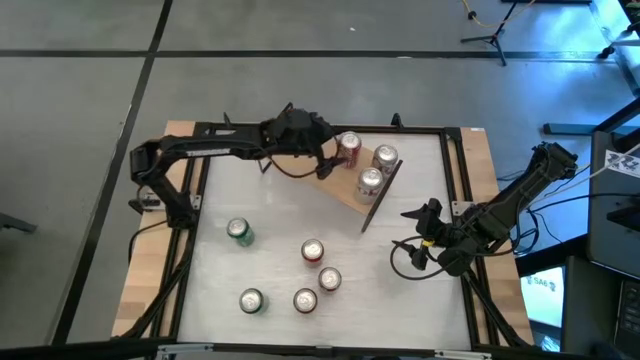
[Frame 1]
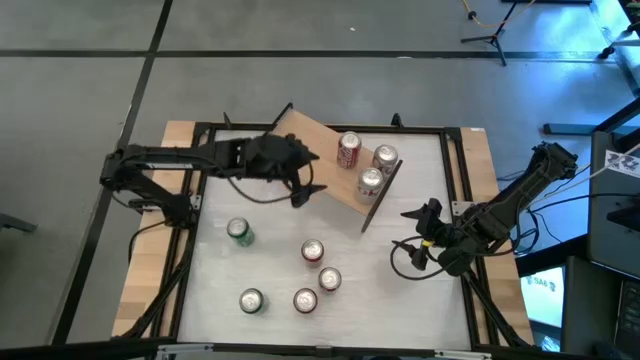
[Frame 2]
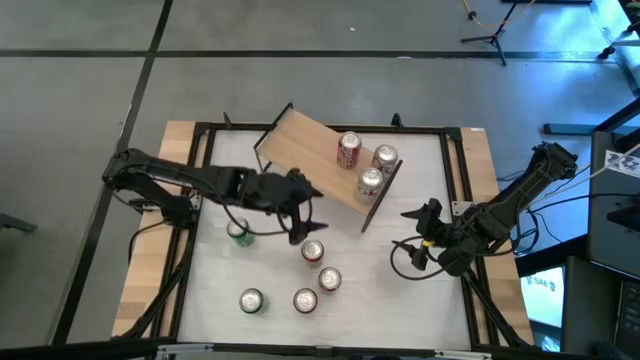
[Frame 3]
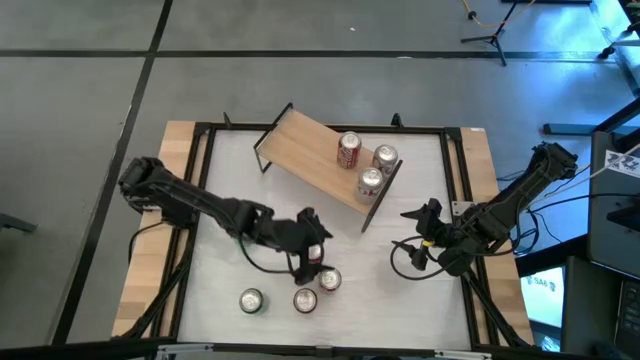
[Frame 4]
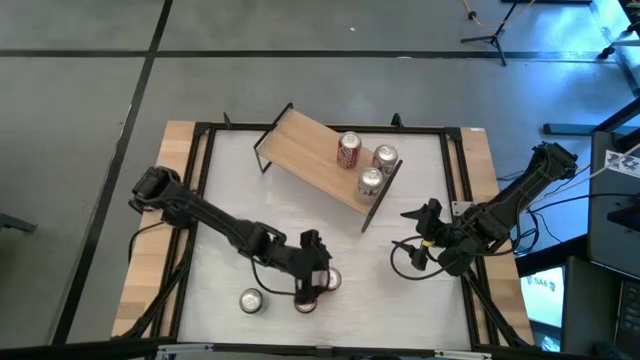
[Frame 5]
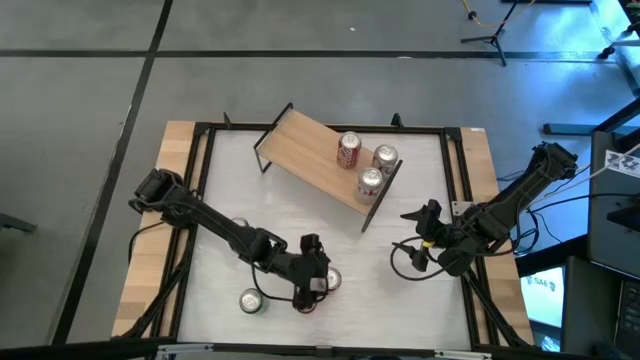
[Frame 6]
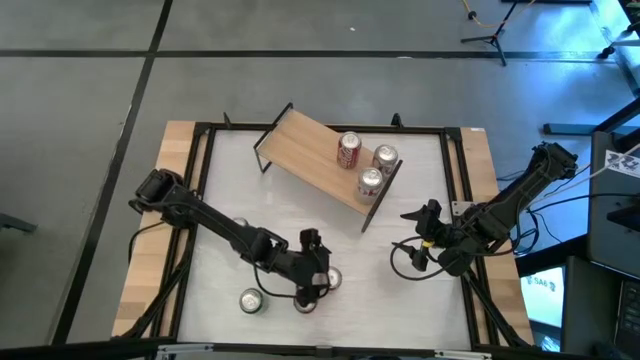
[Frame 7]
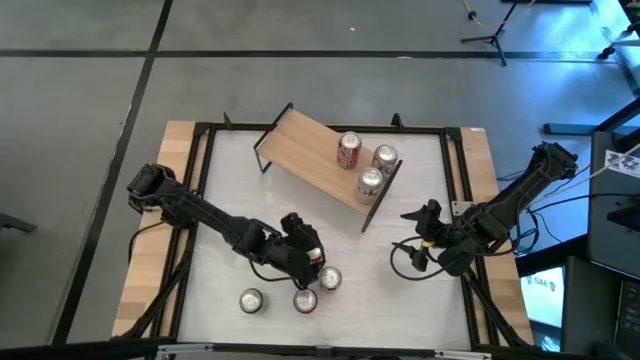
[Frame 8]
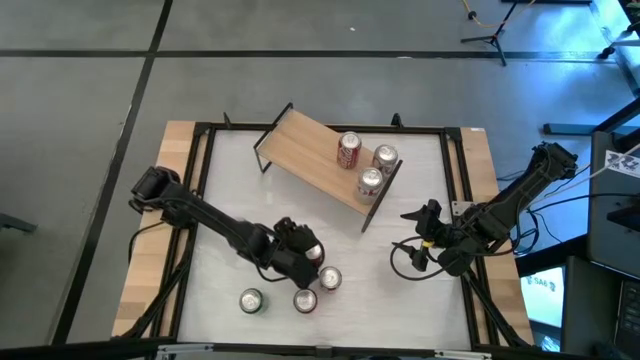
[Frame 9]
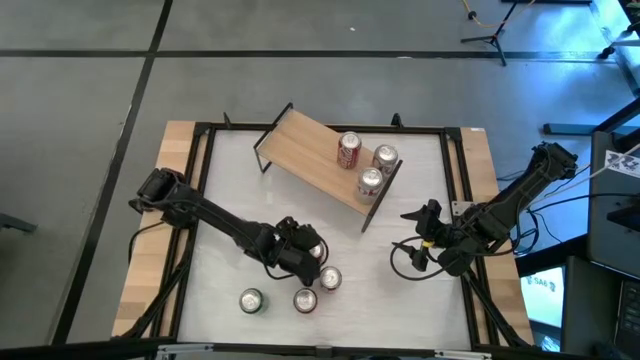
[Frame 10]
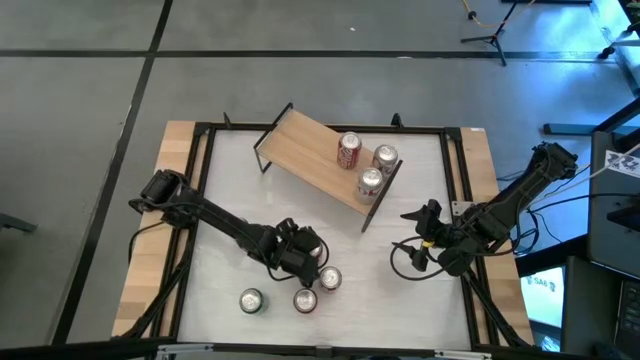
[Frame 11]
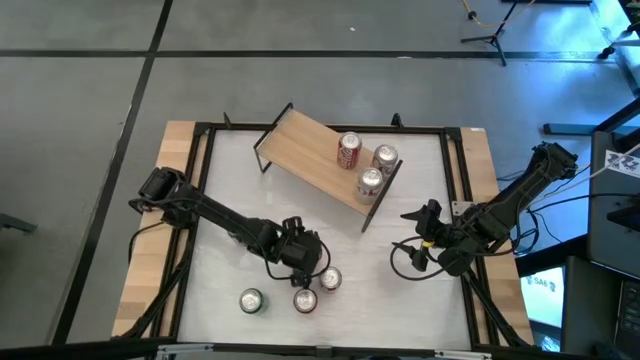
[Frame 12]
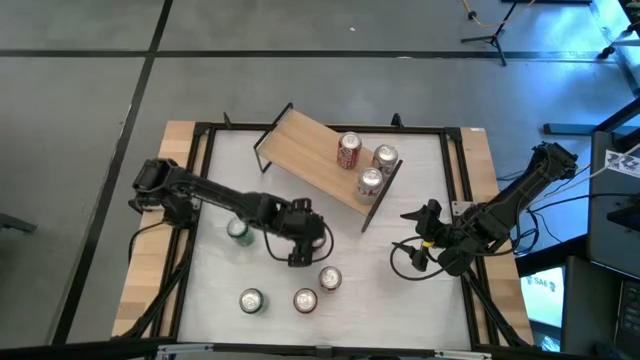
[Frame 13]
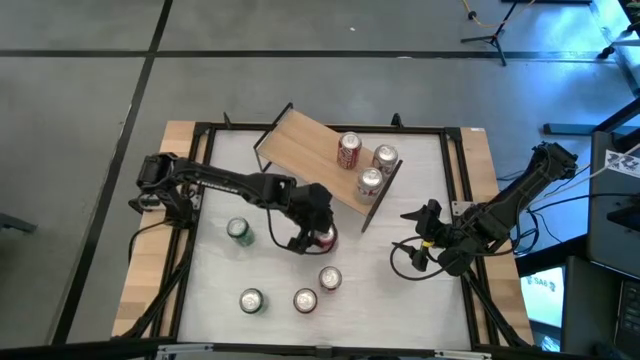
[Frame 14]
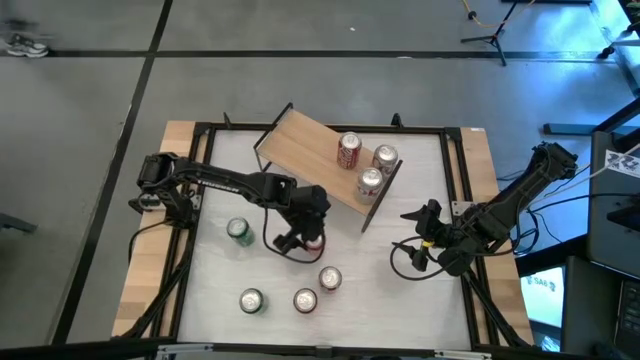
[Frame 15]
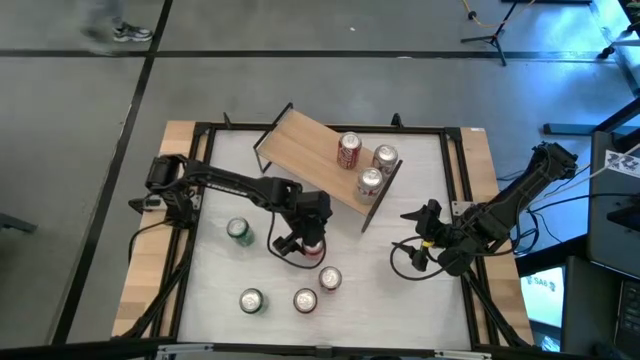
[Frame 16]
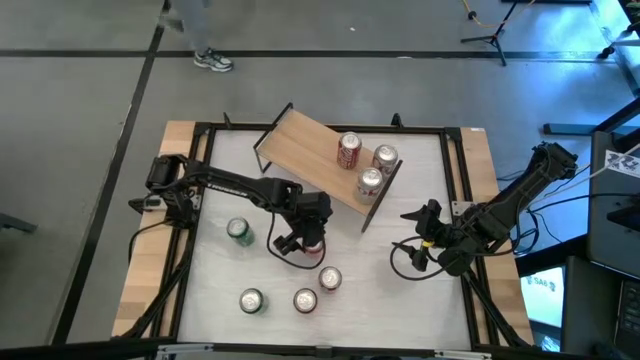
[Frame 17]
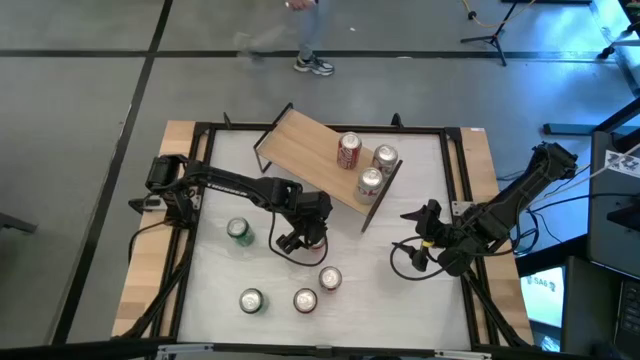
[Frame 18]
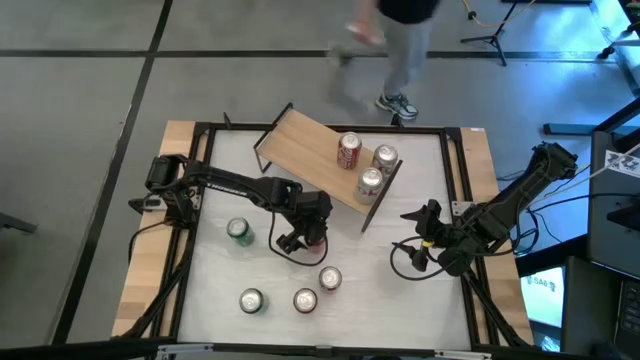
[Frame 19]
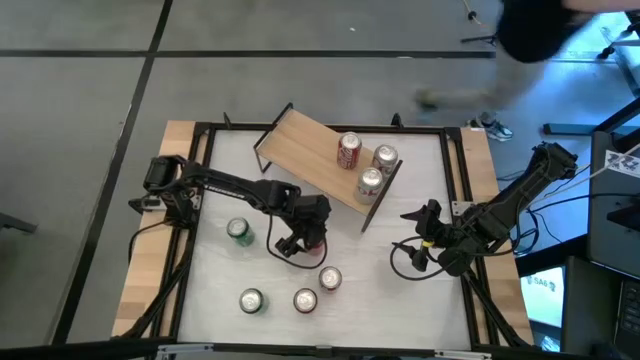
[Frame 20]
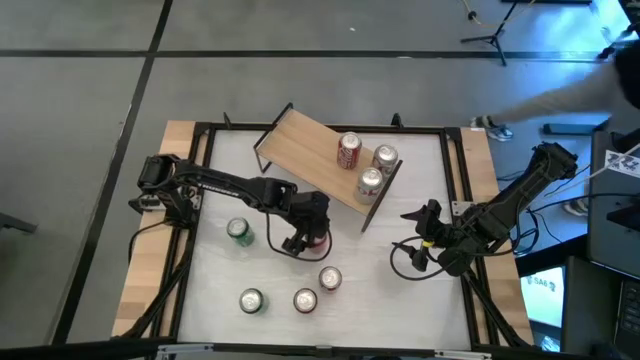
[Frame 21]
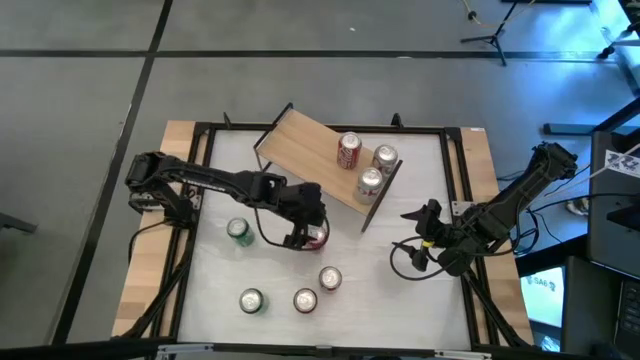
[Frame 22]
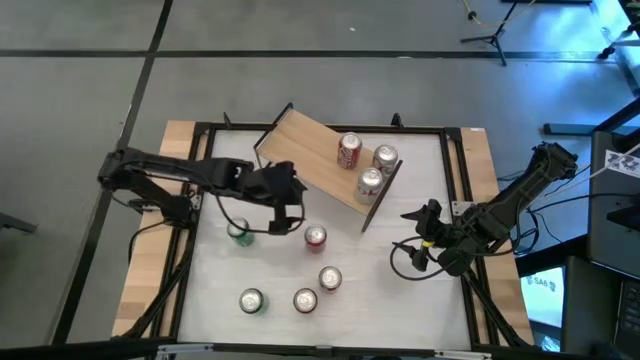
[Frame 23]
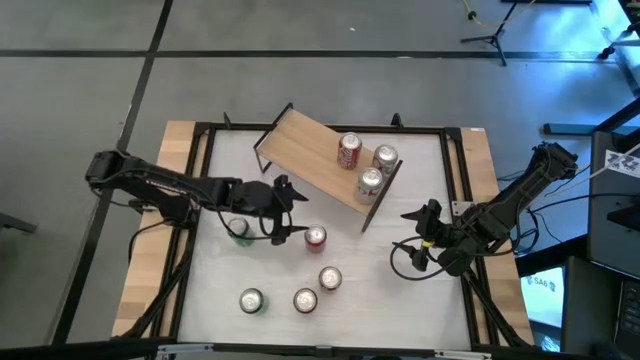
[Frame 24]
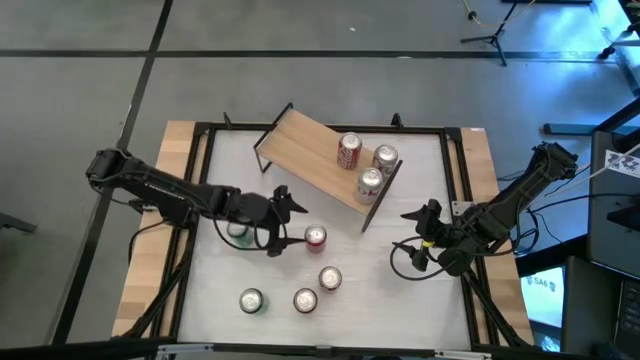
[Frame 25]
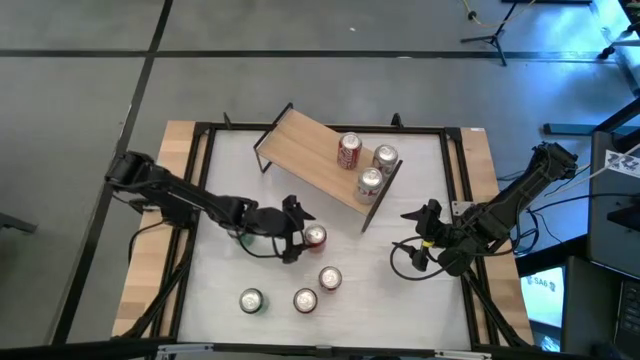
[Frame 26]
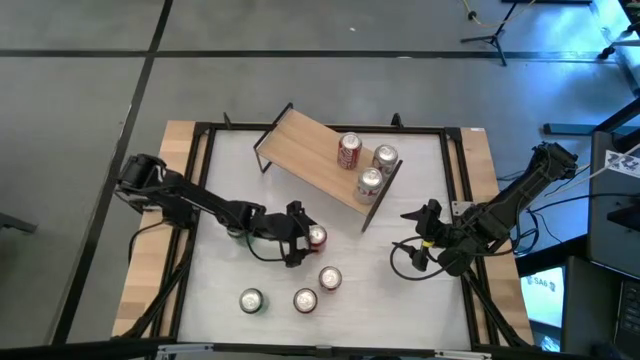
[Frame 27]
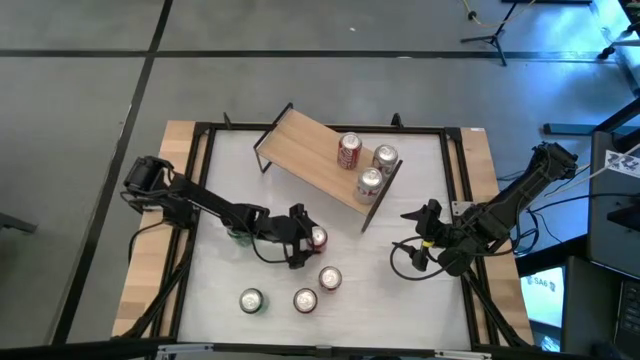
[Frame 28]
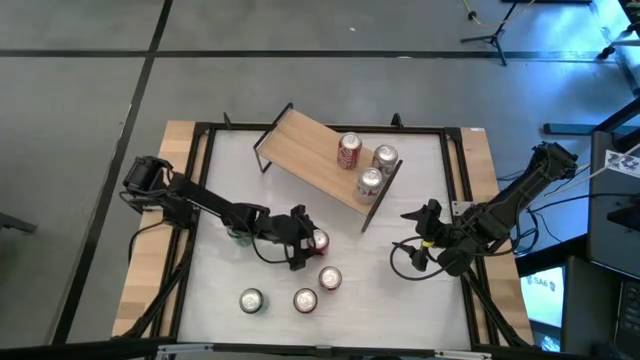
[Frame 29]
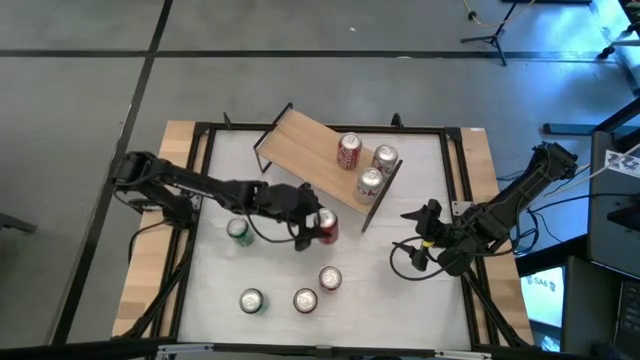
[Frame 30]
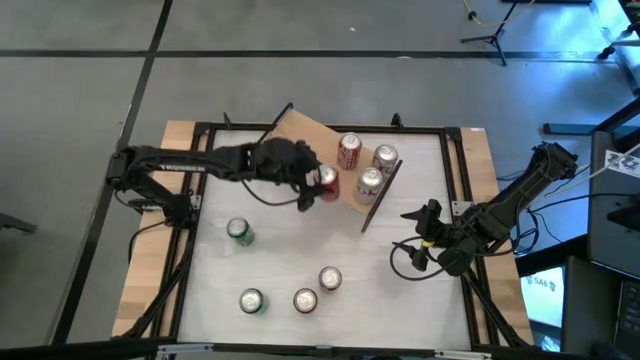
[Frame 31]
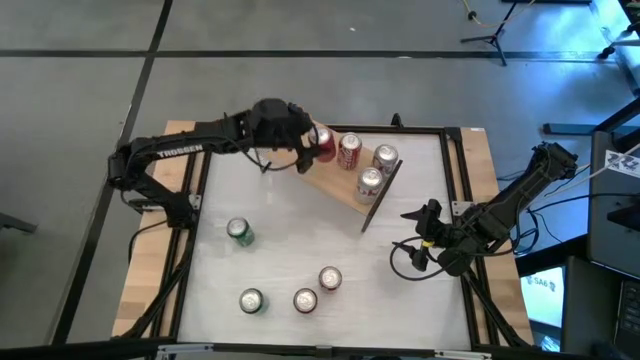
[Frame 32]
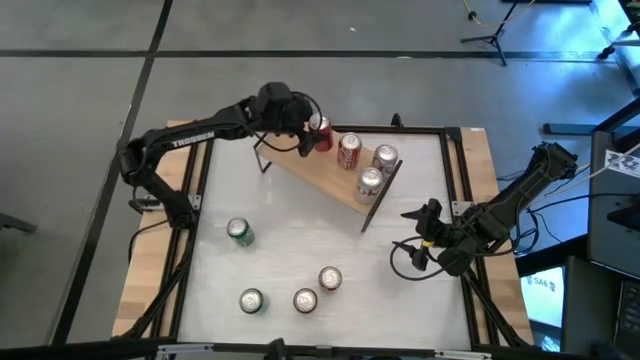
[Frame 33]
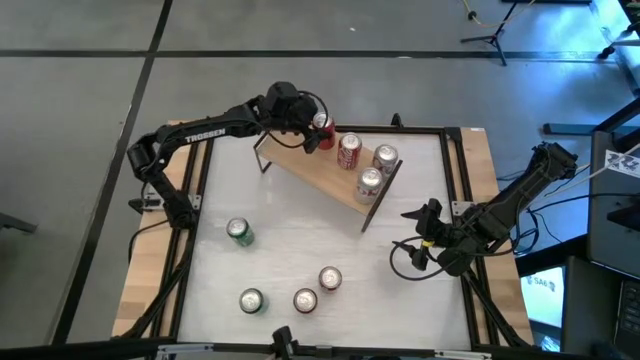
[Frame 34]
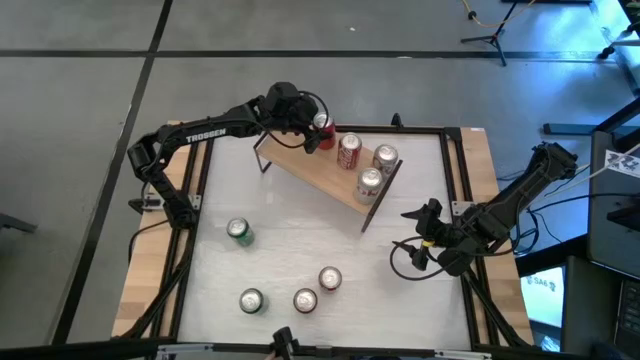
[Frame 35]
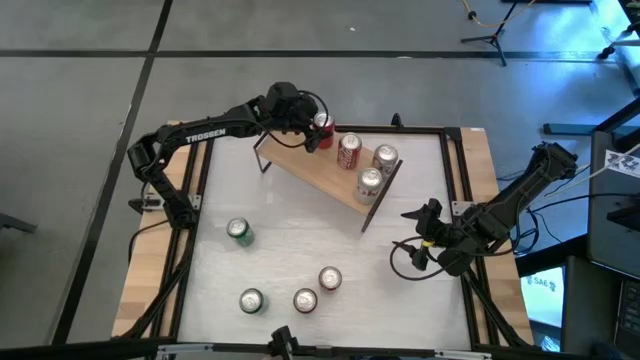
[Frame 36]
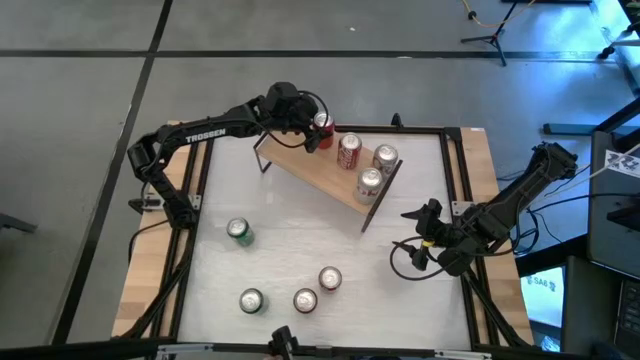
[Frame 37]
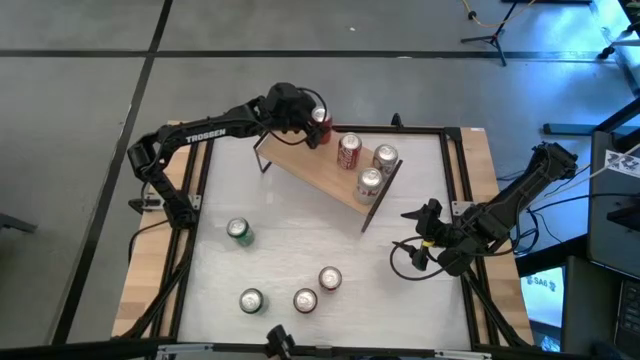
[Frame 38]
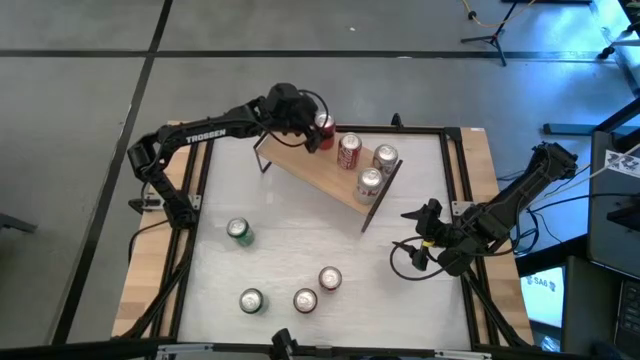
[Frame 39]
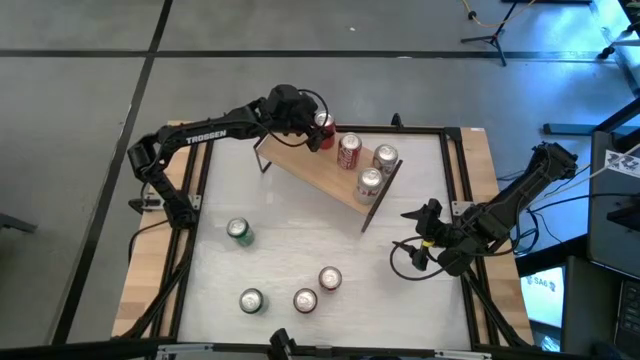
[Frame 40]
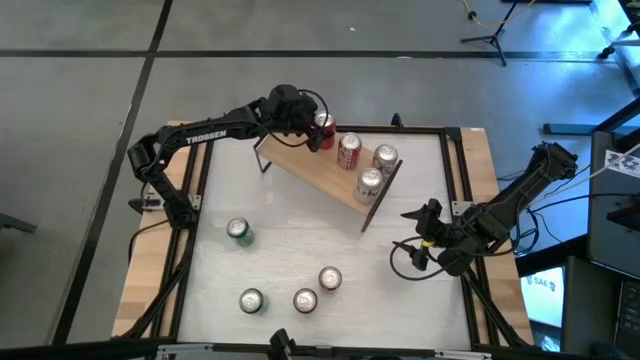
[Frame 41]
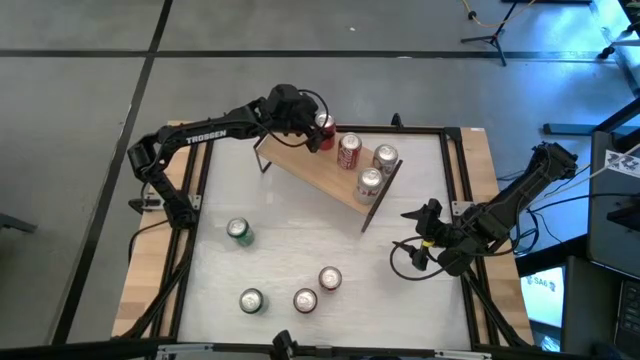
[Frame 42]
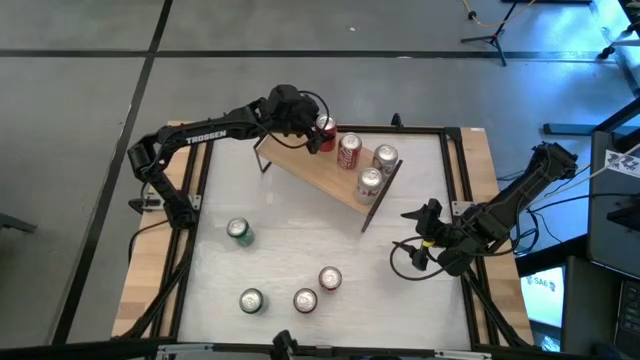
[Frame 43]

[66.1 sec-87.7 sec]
Task: Place canned beverage on shelf
Put the top red-black soda can on the shelf
